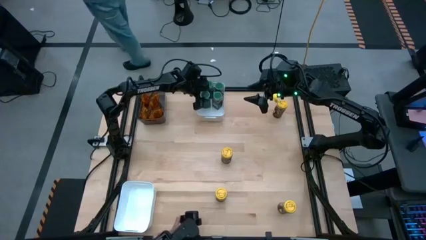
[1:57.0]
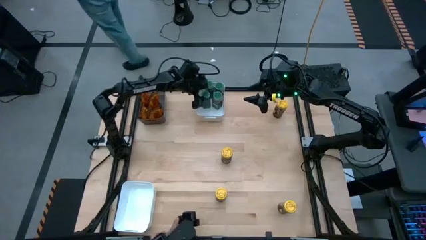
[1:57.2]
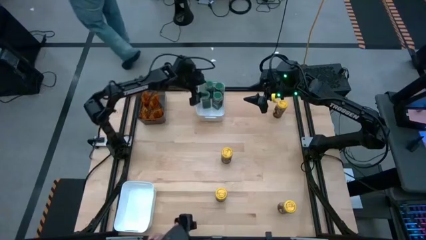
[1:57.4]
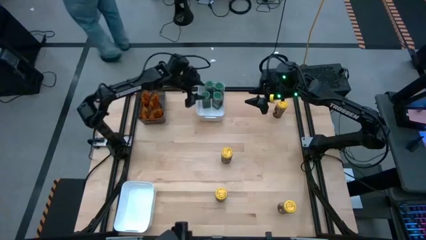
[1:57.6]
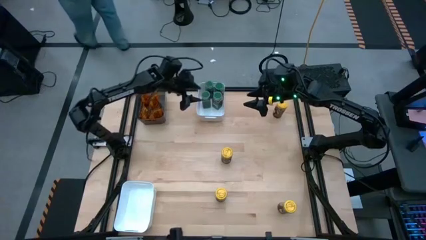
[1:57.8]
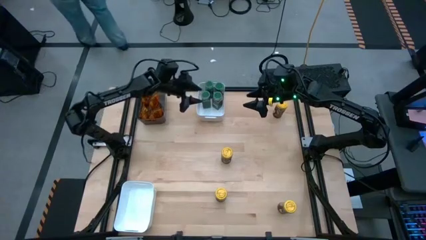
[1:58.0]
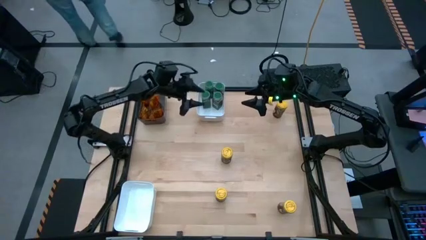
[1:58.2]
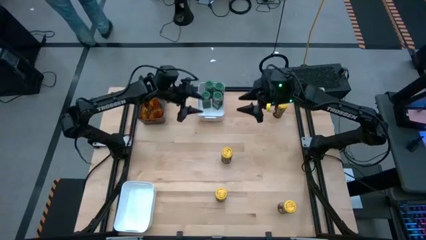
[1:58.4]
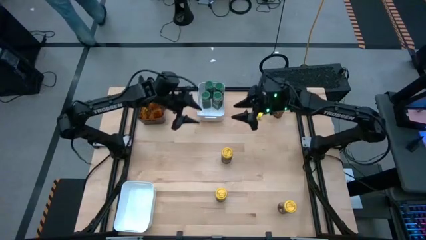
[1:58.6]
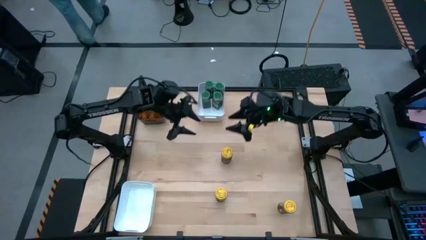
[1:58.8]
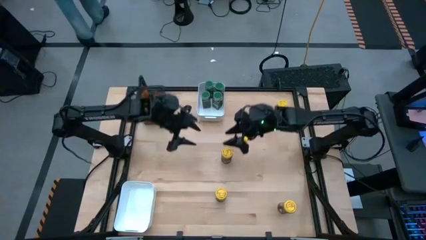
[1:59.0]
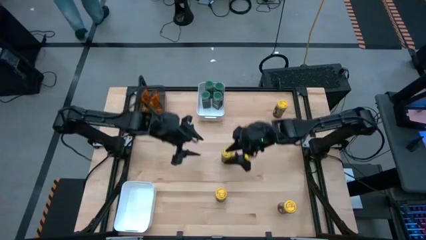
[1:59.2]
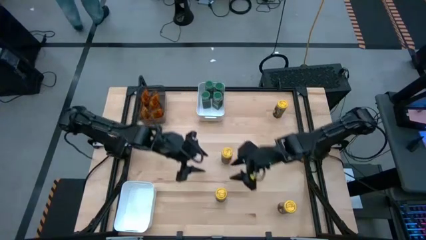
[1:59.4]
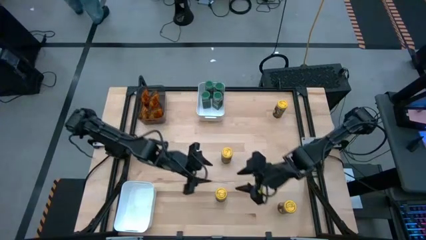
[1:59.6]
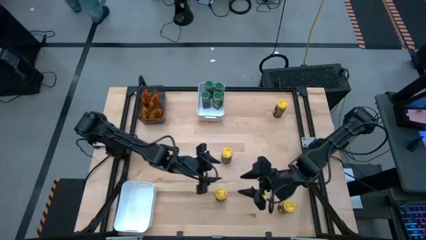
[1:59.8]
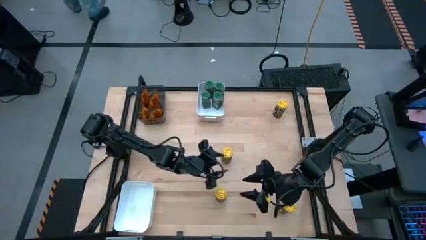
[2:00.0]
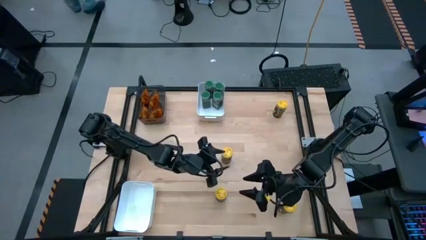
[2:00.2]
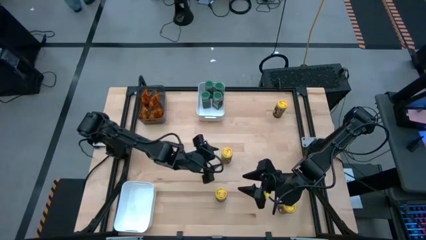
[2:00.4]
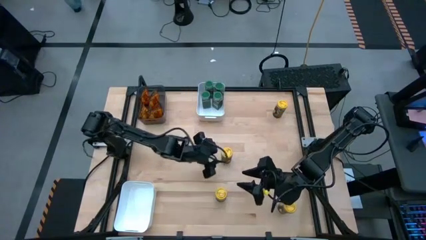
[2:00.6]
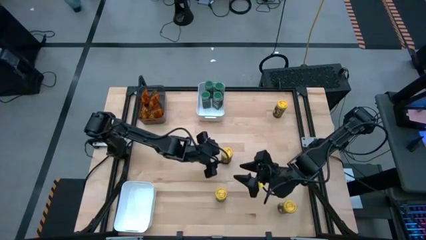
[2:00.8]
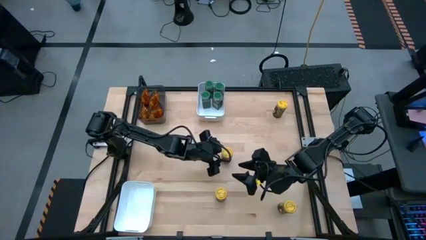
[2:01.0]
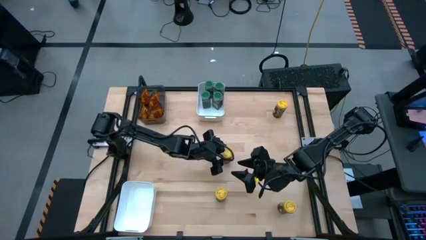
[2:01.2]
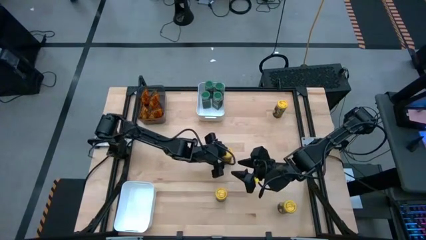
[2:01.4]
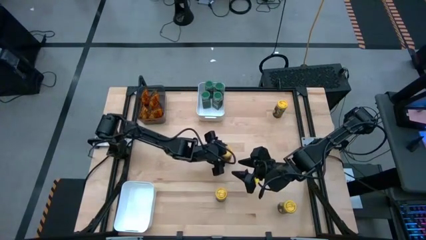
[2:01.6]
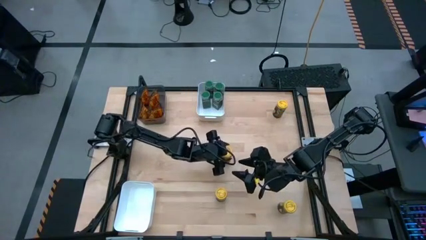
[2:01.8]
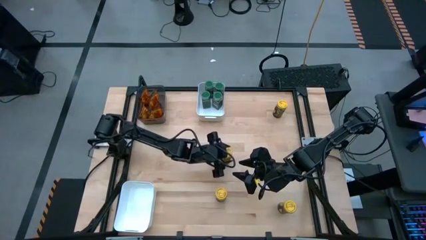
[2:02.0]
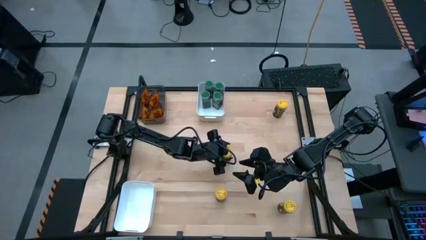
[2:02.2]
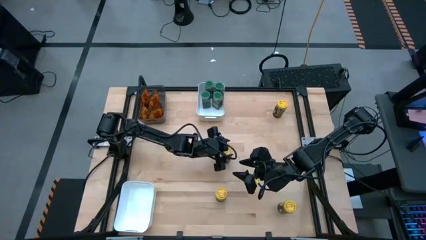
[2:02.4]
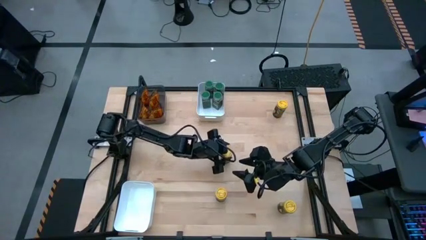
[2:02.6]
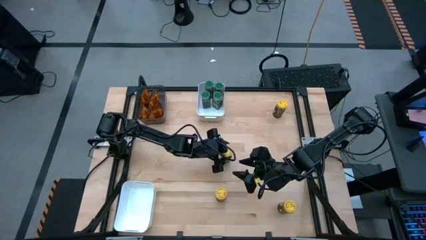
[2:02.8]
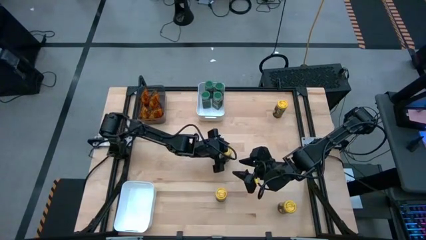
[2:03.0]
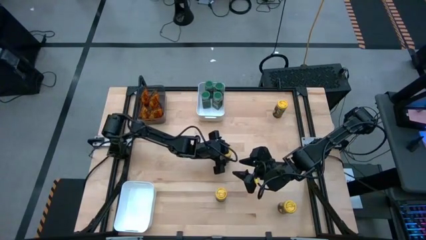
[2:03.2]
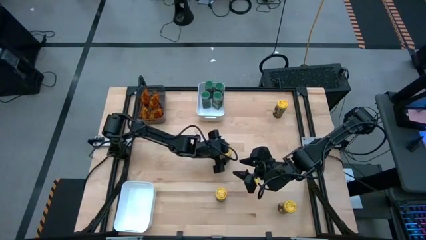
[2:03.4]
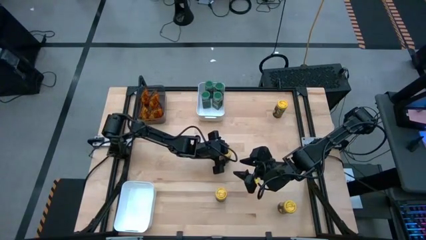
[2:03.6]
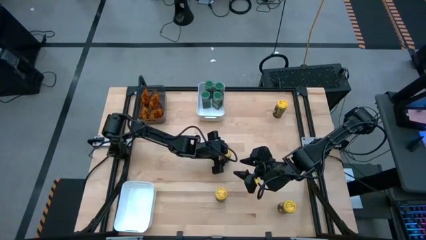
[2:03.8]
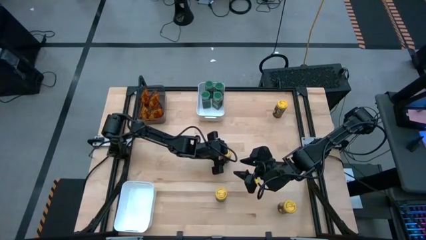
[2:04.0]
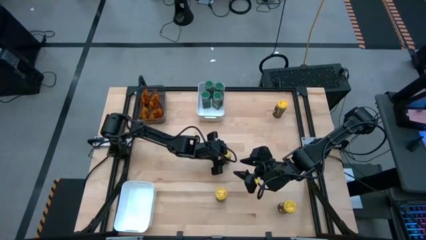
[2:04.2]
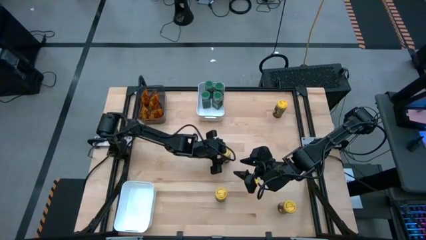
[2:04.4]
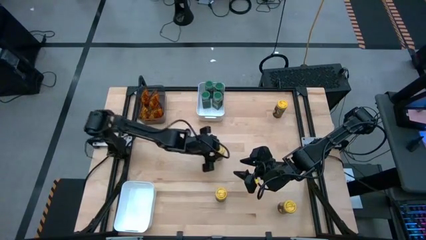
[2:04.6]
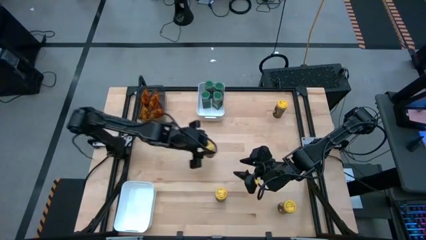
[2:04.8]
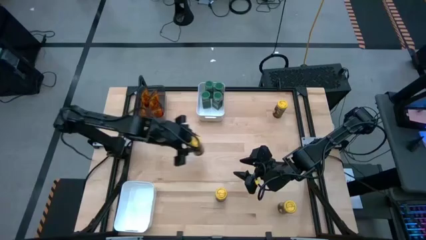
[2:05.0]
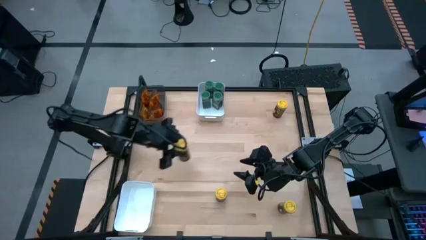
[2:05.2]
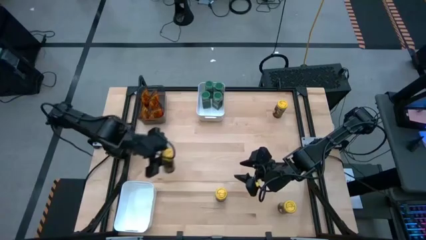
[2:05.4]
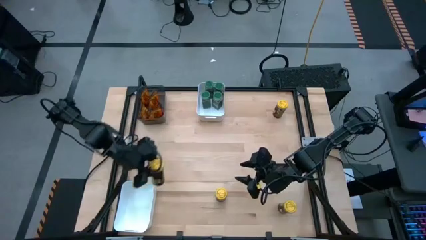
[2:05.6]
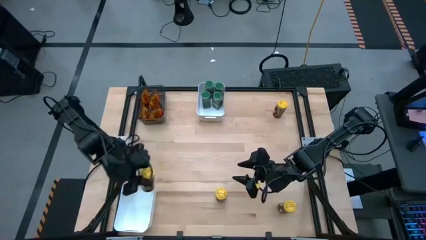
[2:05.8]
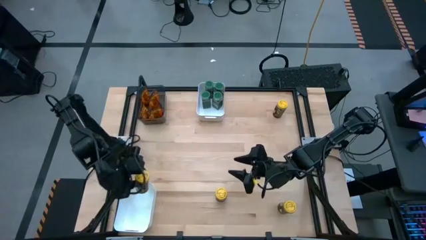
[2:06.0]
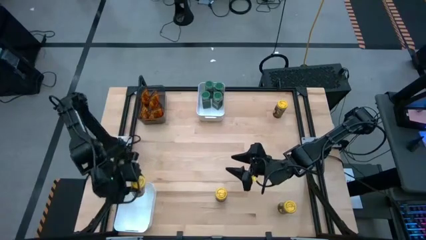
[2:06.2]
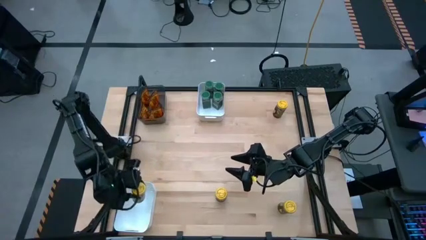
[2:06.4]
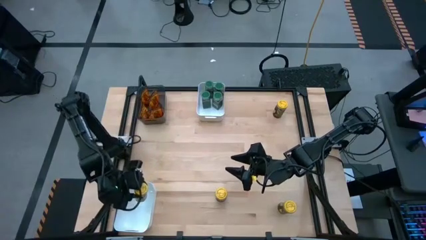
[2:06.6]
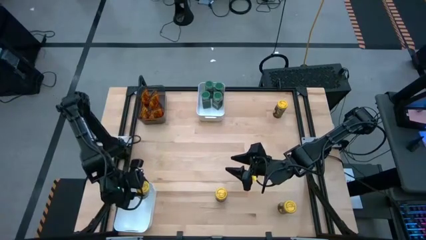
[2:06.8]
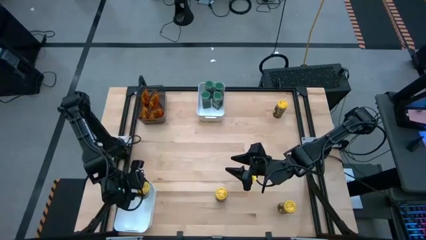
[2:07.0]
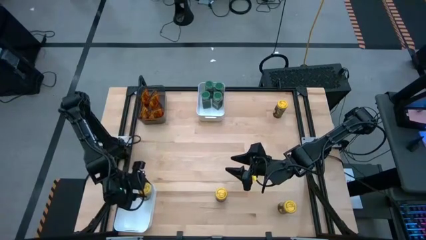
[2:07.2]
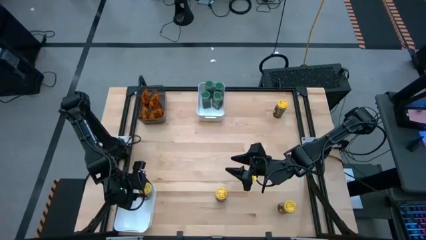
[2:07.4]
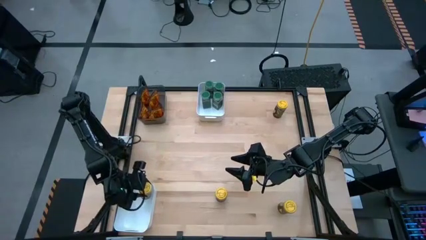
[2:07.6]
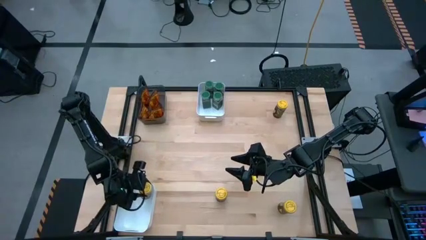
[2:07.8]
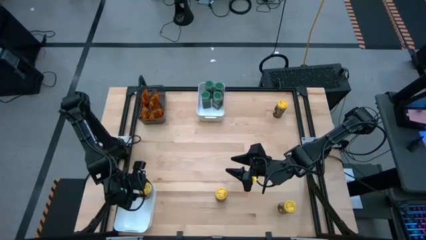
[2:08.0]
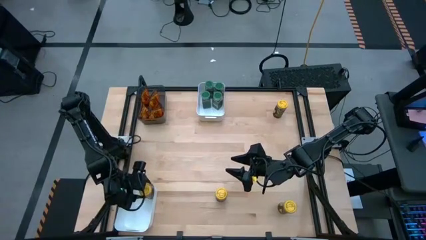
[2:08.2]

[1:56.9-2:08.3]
Task: Sort spices by type
Put the middle yellow seasoning bottle into the bottom white bin

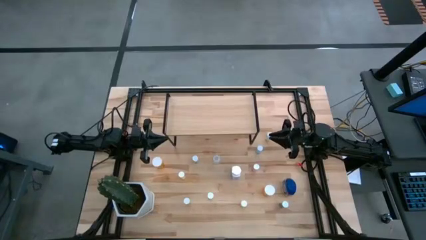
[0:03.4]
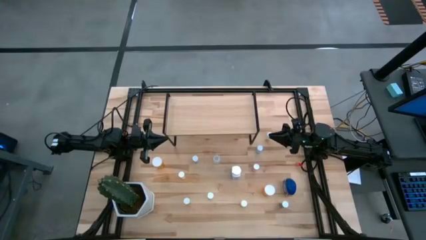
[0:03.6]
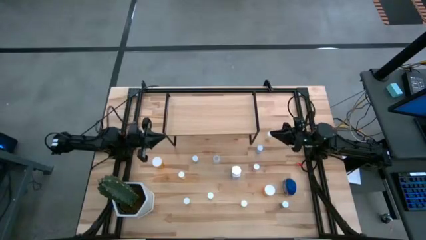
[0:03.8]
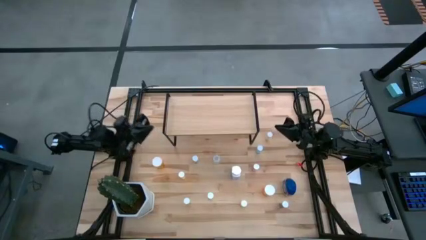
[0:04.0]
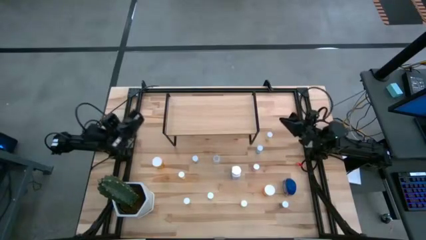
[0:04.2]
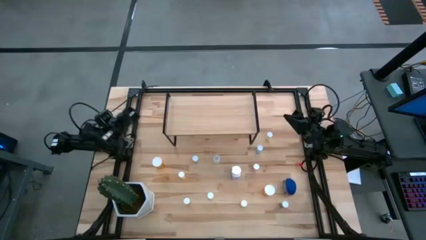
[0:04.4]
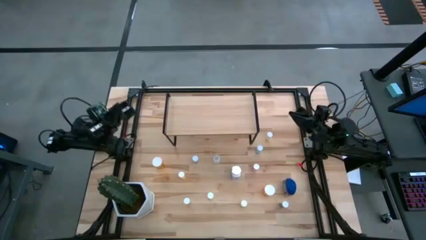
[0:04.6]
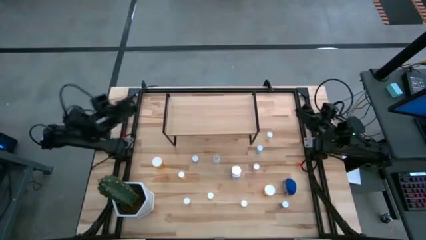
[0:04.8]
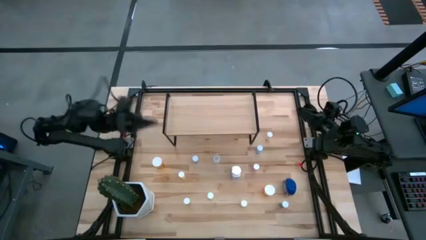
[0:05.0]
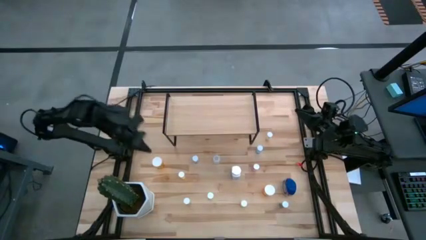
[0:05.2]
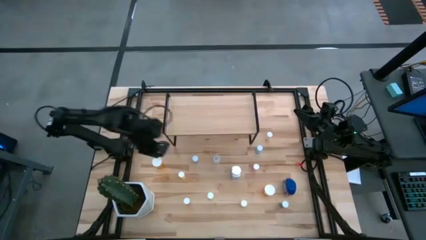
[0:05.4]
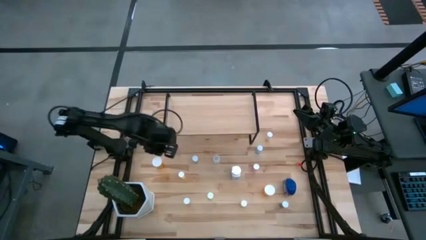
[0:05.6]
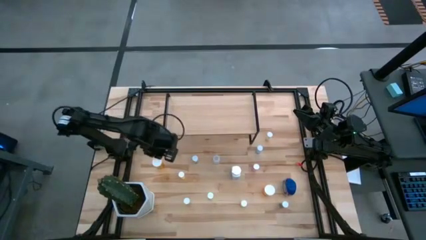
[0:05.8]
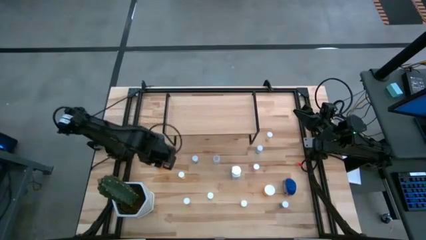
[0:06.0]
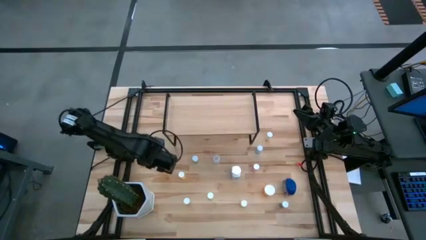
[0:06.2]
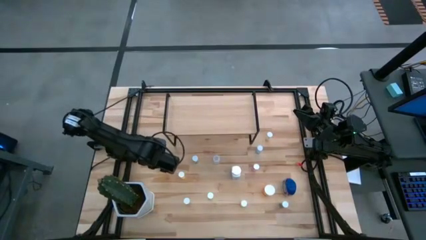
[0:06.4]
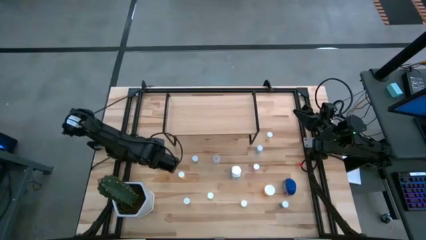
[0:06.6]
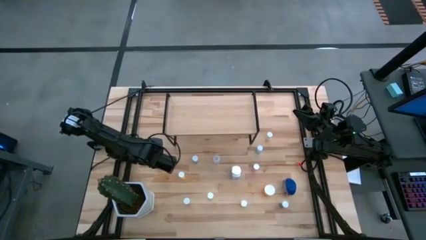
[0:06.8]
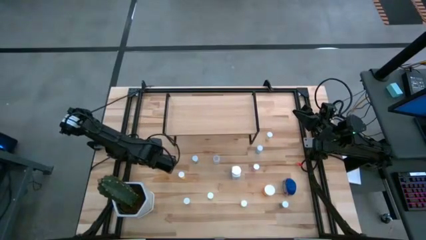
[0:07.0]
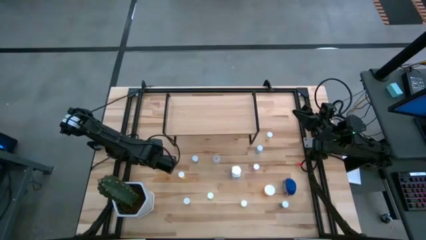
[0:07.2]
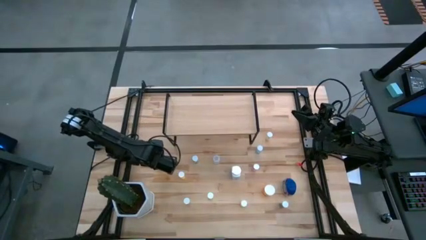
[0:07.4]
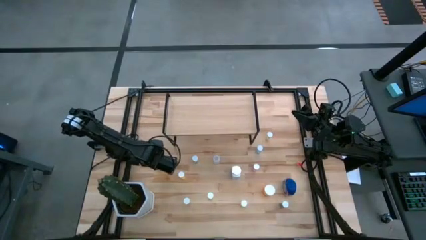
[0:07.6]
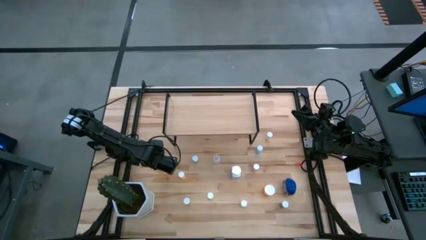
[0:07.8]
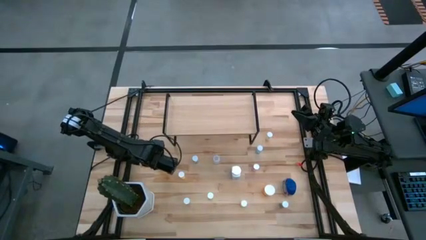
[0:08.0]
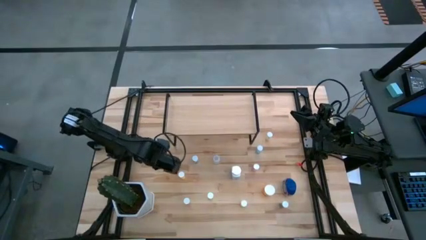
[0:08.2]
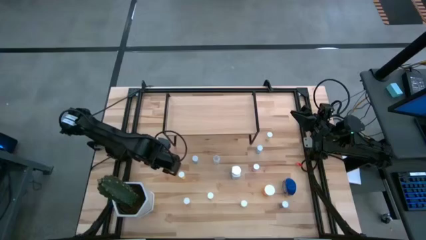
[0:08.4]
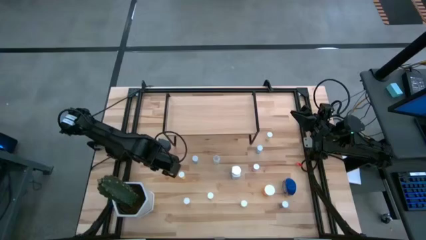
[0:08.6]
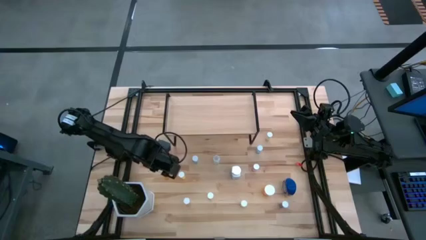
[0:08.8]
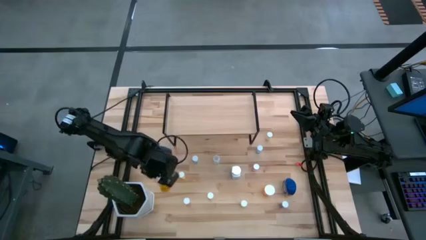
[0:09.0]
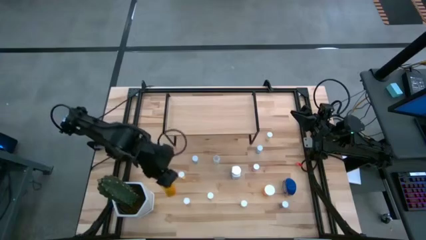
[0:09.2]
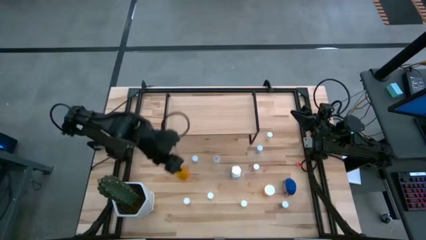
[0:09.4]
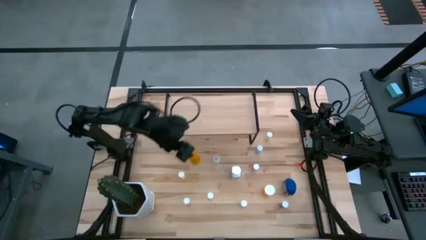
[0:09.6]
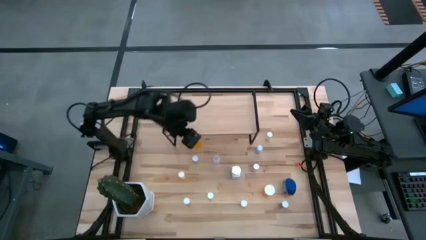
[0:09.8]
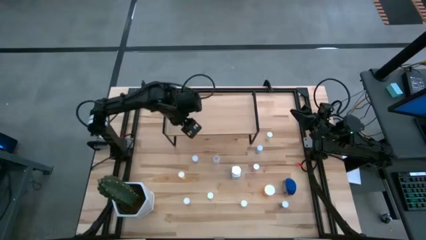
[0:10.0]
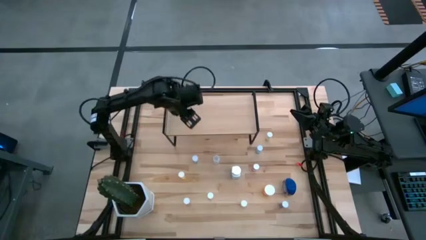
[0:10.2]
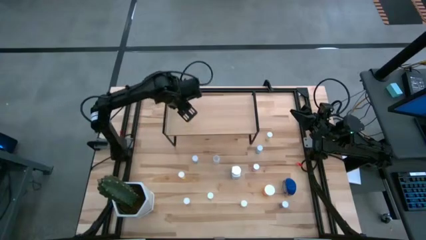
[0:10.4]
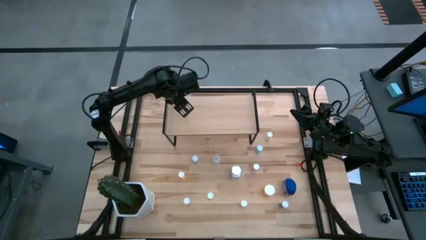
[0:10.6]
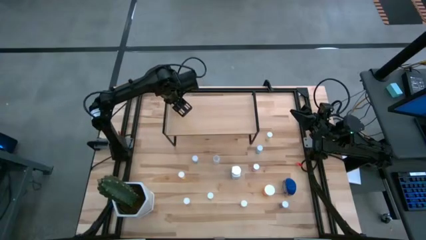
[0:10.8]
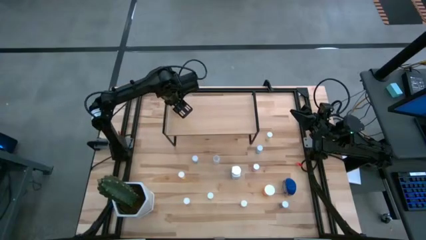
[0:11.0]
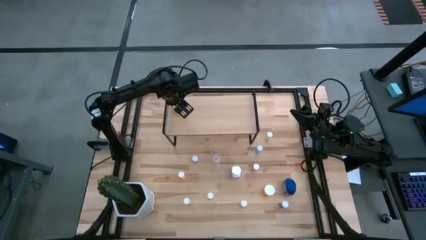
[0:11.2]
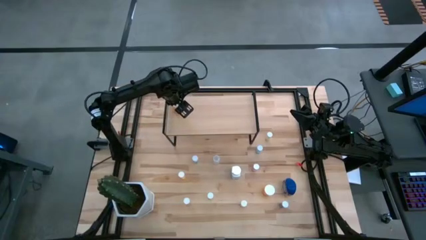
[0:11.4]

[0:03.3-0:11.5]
Task: Pick and place medicine bottles onto shelf by color
Put the orange pill bottle on the shelf
